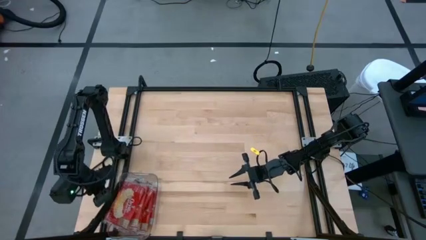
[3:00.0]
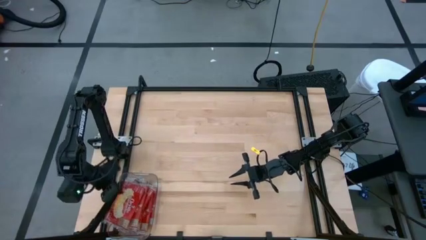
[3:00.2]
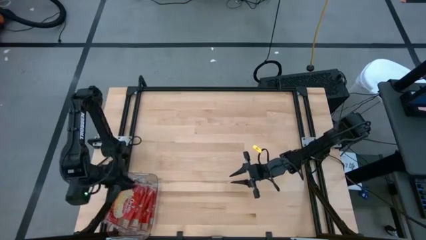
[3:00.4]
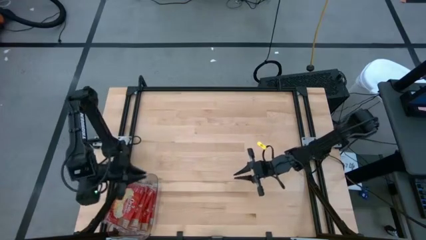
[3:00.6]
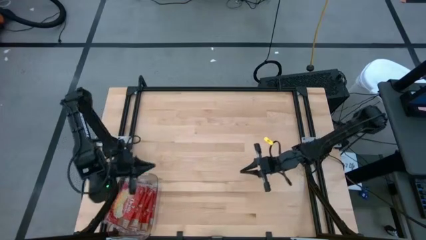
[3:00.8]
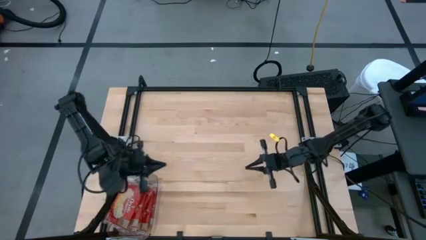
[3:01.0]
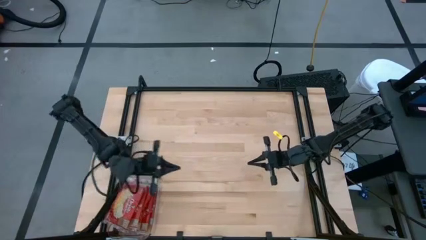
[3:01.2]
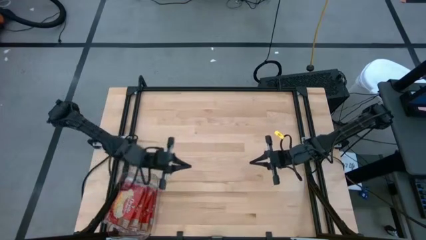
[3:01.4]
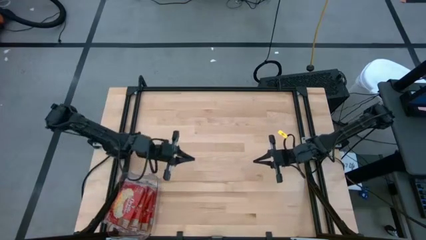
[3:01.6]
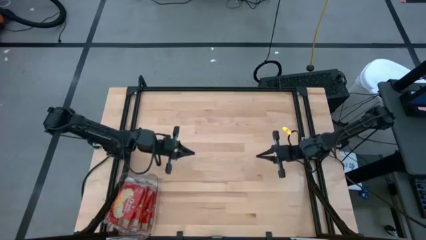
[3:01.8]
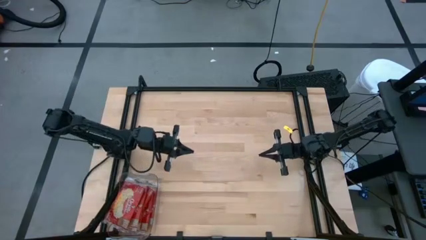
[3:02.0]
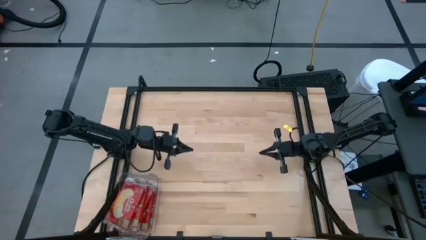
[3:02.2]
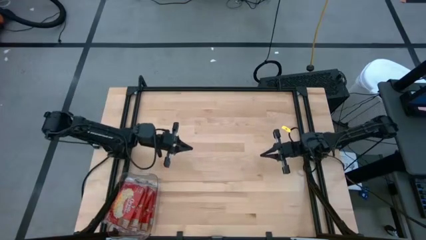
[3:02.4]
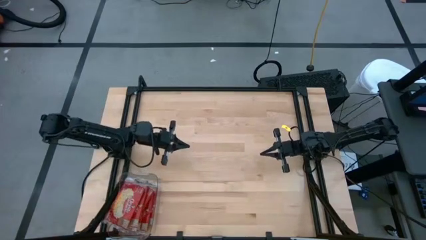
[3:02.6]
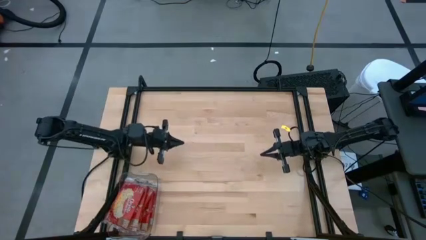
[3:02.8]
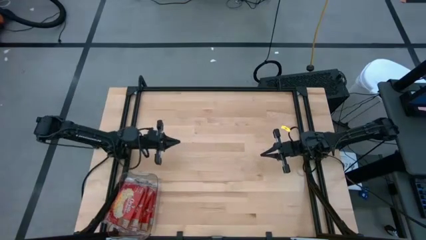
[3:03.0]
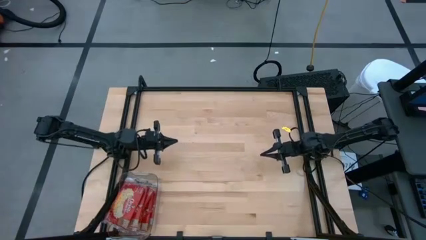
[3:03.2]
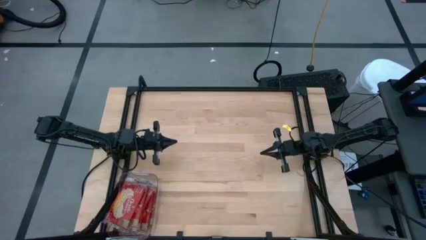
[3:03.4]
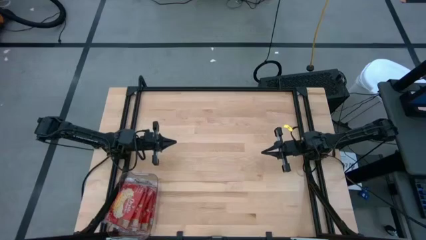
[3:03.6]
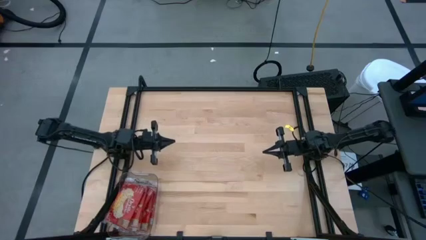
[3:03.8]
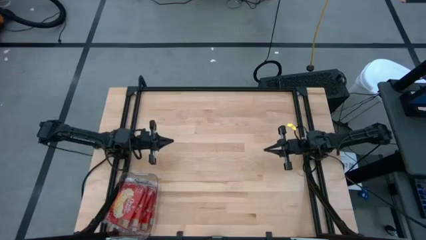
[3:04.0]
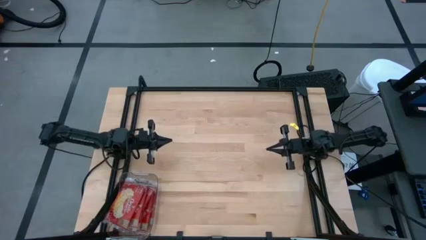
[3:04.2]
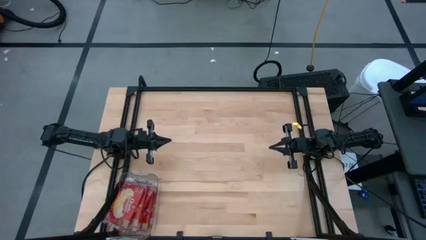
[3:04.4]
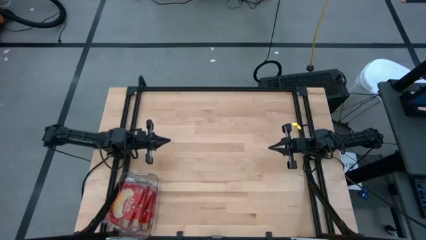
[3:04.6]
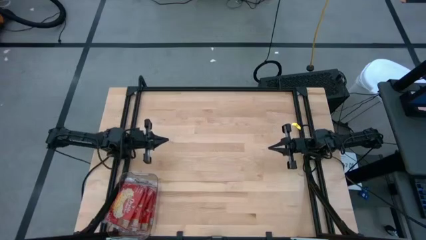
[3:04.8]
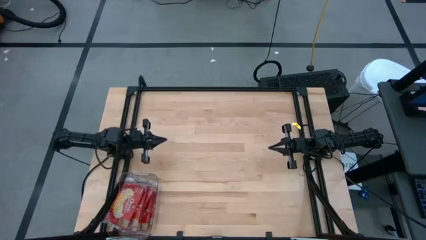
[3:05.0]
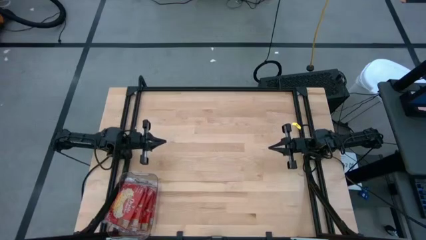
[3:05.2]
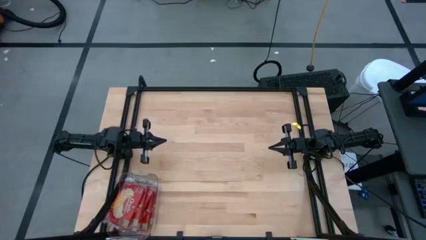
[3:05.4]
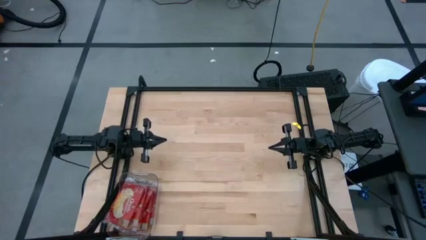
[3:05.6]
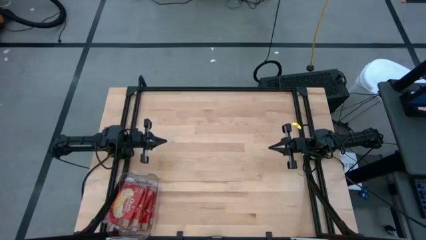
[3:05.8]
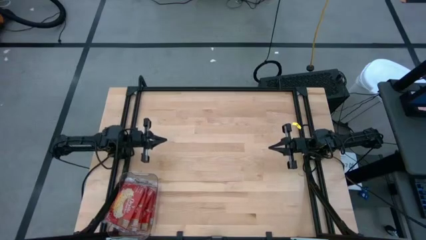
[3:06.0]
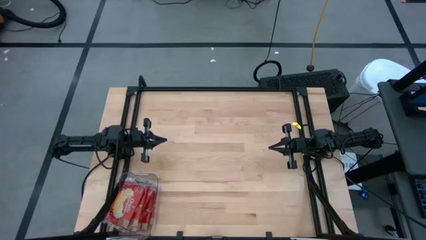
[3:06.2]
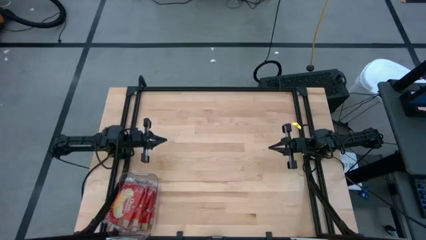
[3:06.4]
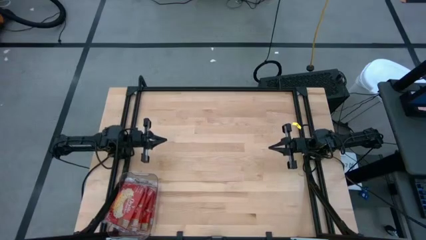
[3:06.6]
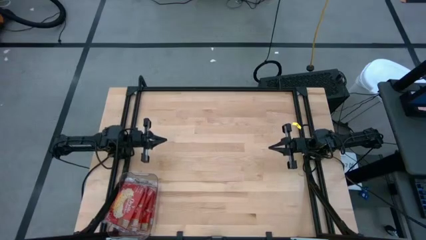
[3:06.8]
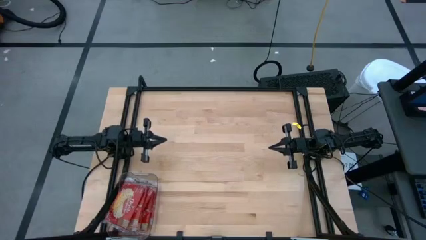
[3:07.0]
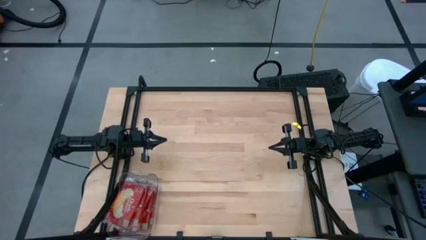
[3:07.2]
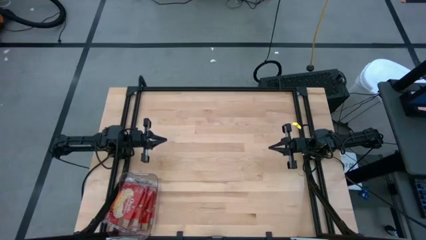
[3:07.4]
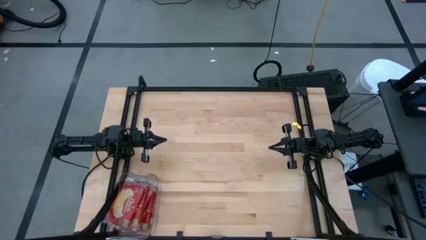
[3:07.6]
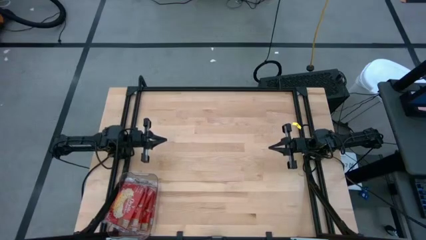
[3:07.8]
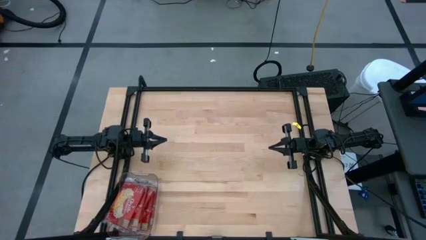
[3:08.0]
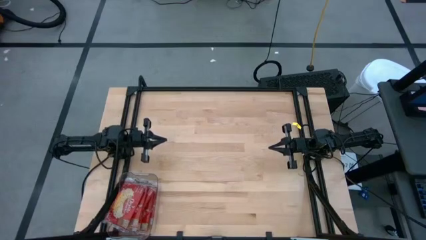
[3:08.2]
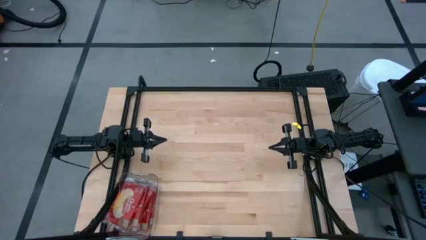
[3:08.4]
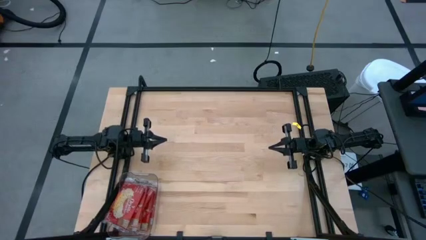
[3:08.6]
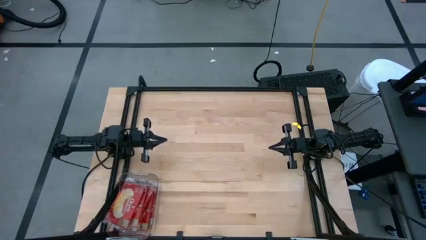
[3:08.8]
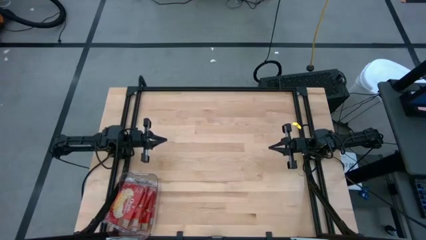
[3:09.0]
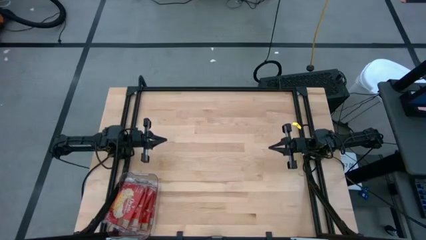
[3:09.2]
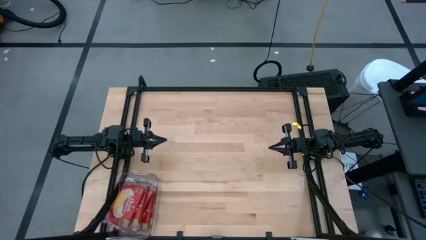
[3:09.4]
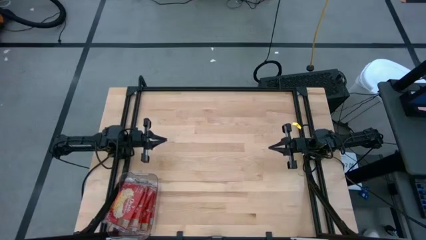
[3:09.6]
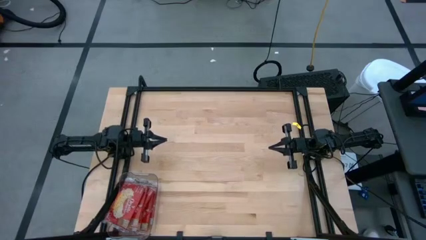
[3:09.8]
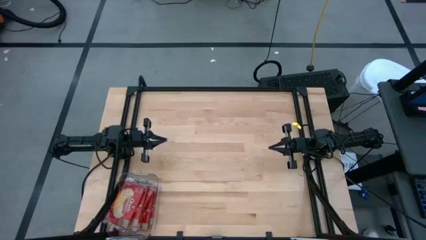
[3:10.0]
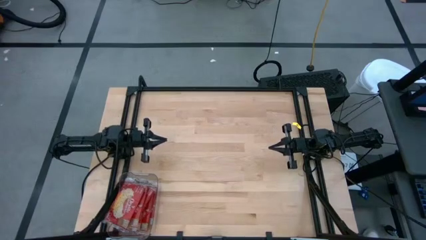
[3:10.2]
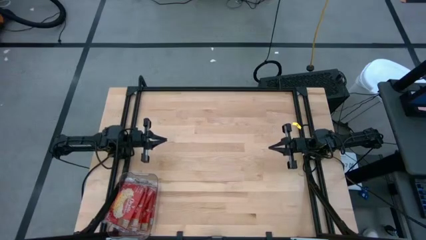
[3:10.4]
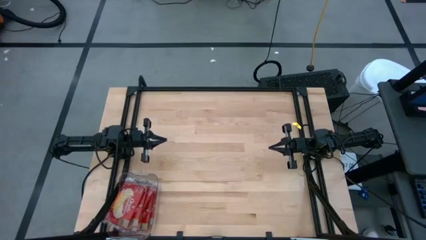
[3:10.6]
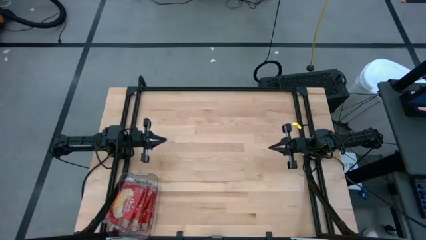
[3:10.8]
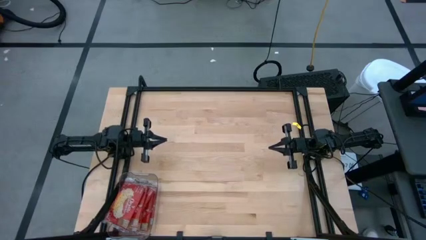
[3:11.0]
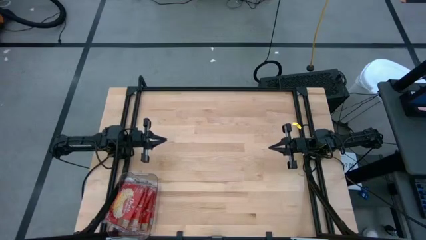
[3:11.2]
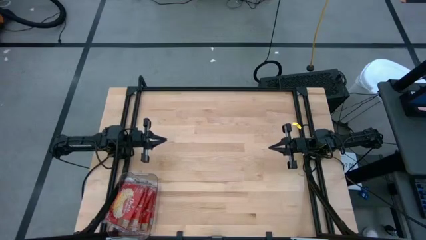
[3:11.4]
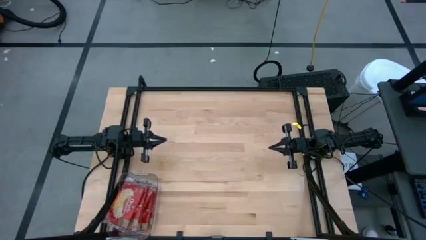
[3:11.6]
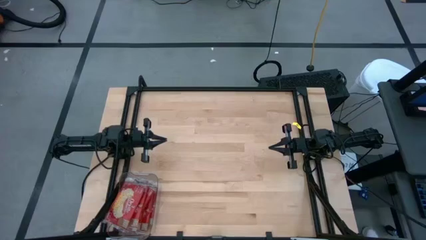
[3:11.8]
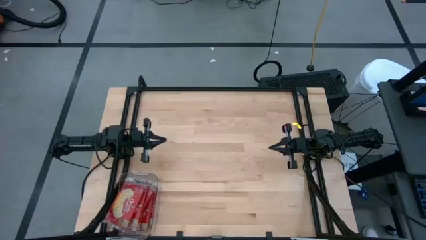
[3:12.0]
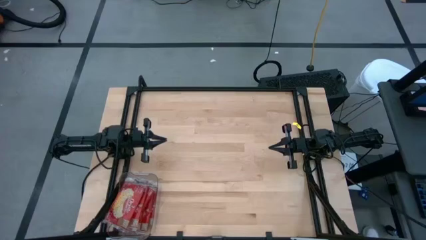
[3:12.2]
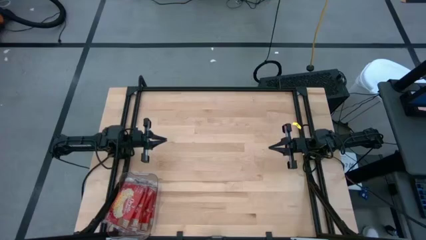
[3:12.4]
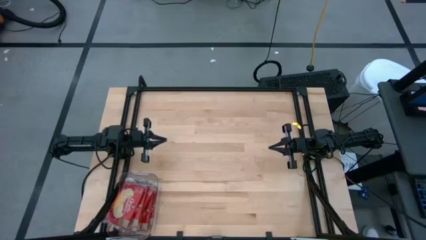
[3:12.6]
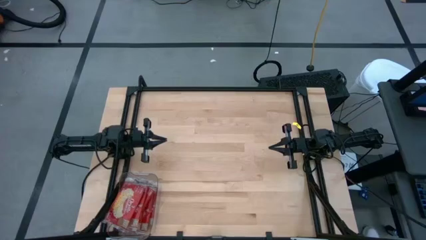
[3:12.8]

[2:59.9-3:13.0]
Task: Sort popcorn bags into baskets
Return to Home Position

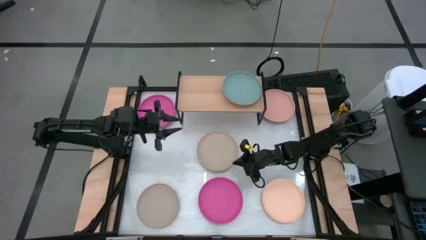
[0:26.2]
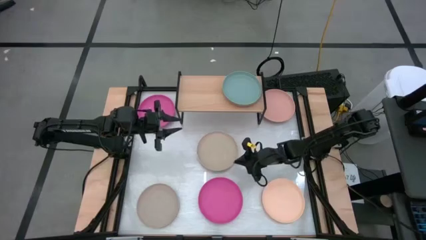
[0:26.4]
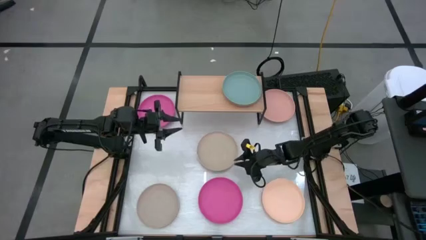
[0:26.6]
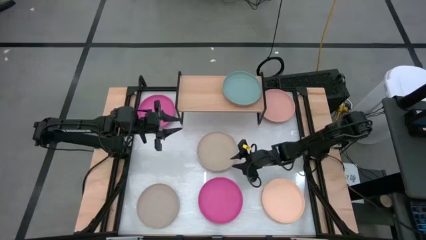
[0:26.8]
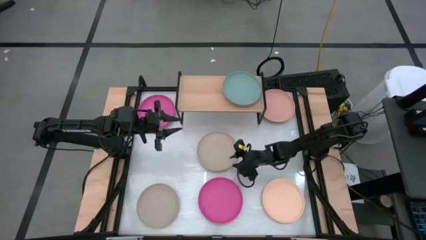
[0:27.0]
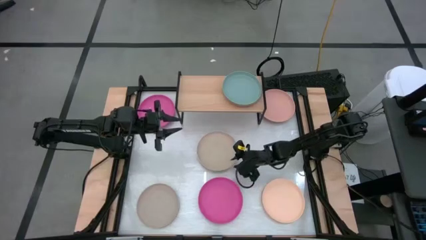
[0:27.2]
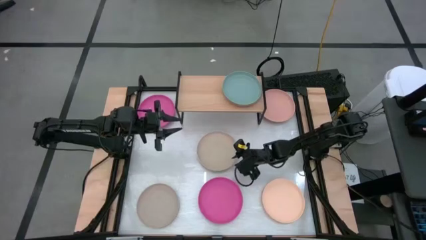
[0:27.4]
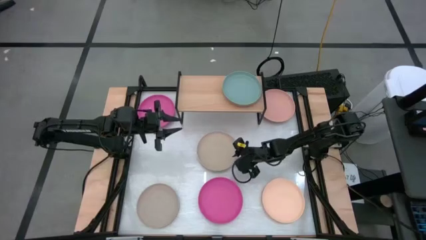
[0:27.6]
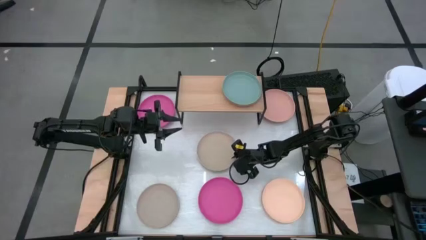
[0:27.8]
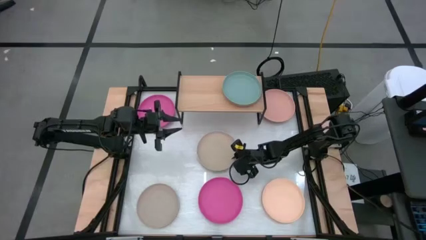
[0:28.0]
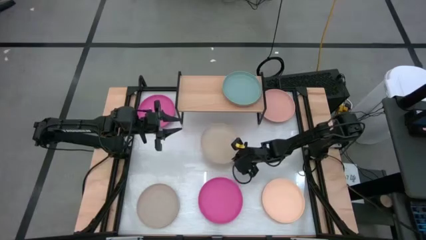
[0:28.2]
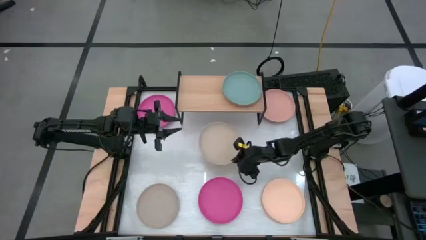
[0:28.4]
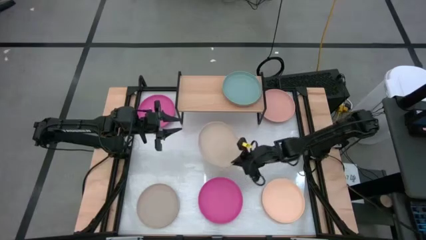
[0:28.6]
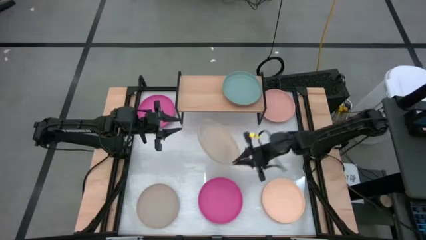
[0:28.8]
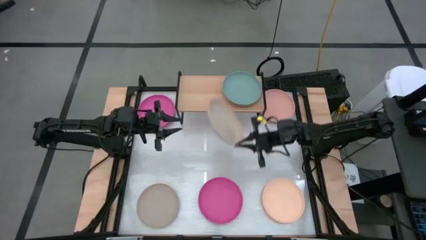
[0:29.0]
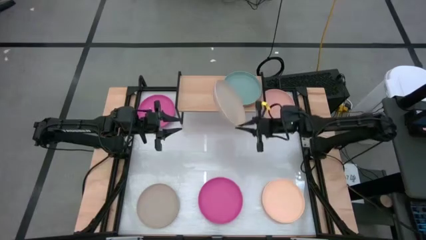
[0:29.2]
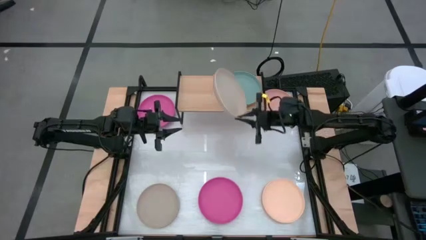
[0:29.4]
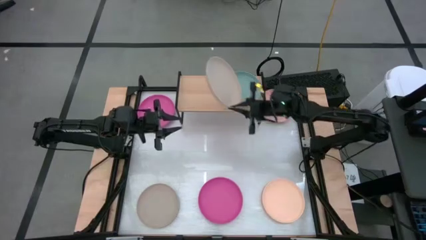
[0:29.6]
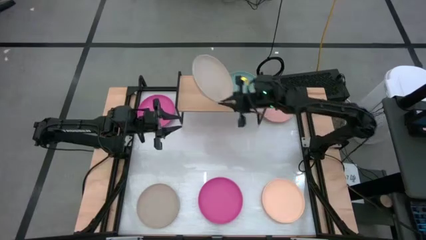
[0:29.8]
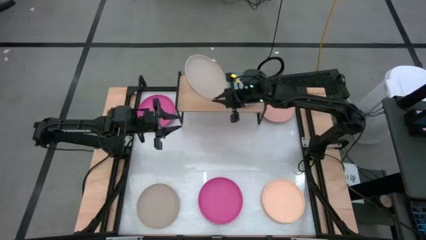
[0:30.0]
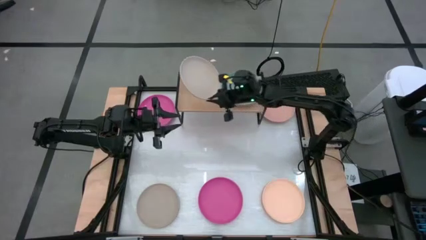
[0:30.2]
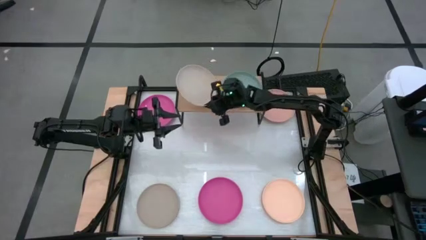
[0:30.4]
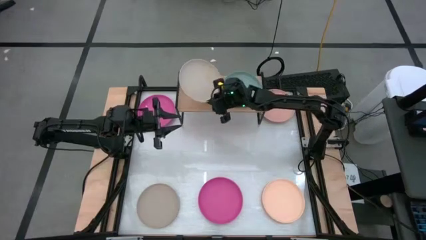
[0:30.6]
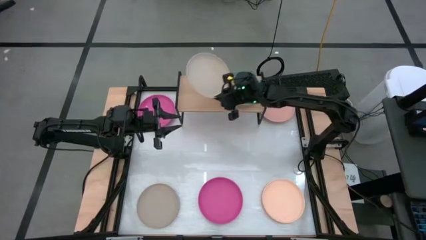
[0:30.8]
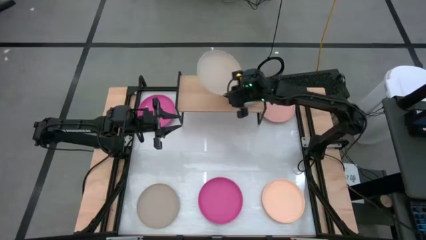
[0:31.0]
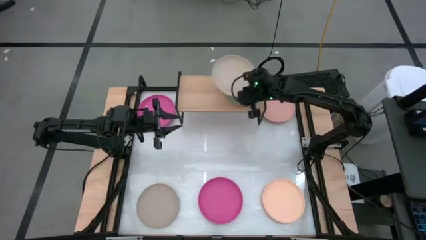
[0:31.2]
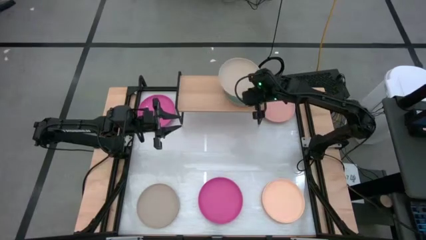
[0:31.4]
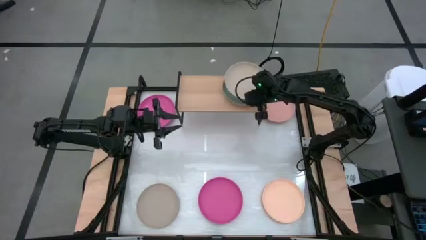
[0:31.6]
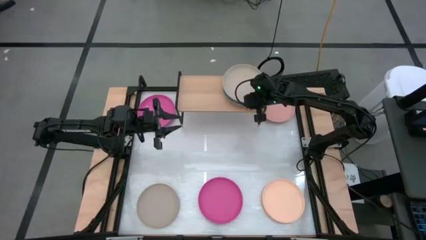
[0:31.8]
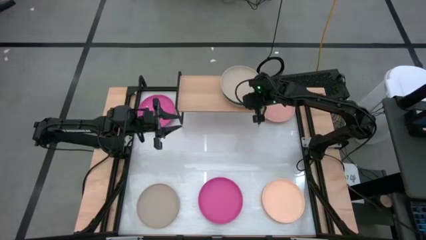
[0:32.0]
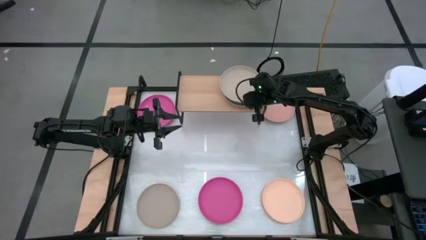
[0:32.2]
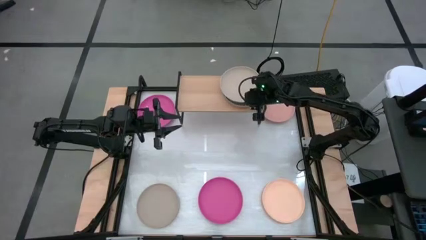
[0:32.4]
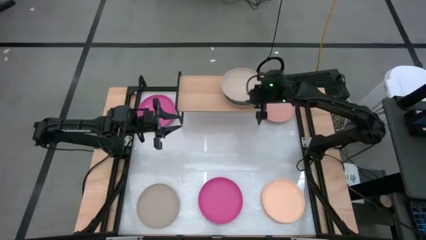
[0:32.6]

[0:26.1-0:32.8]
Task: Place and stack plates onto a shelf
Stack the top light brown plate on top of the green plate on the shelf
